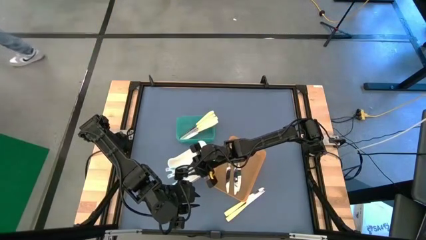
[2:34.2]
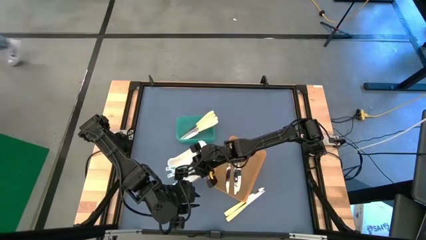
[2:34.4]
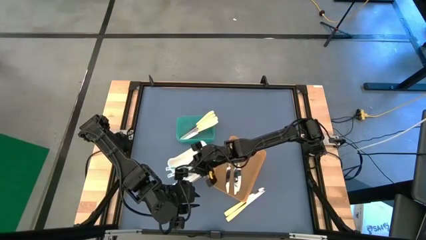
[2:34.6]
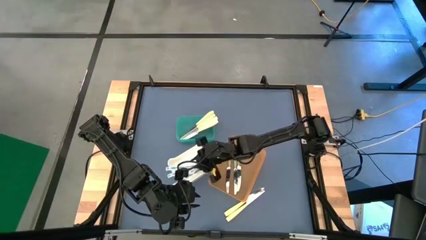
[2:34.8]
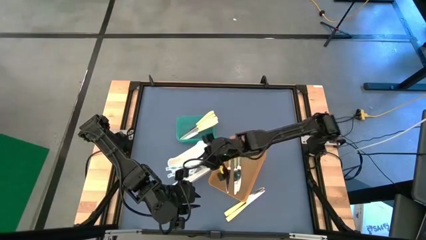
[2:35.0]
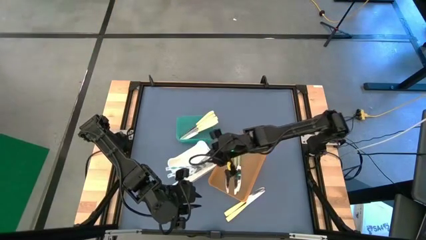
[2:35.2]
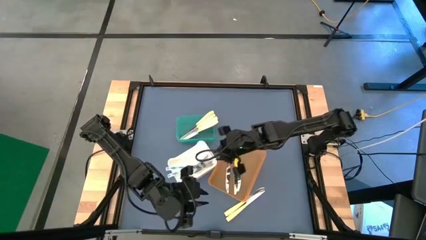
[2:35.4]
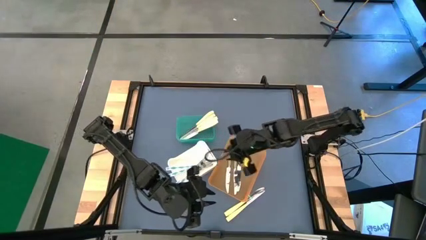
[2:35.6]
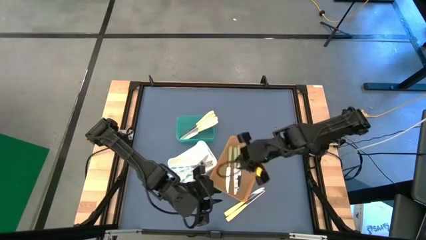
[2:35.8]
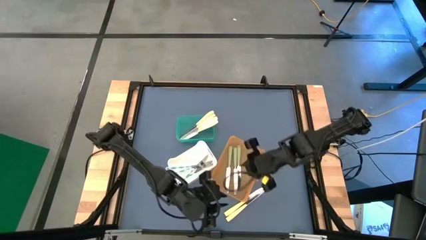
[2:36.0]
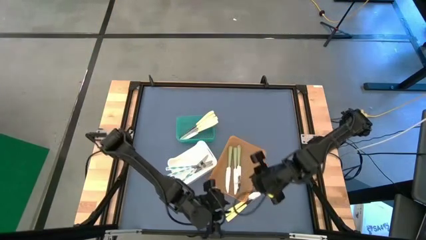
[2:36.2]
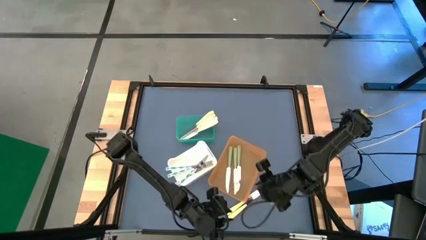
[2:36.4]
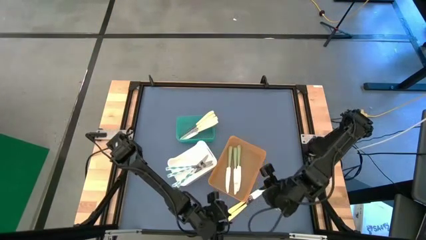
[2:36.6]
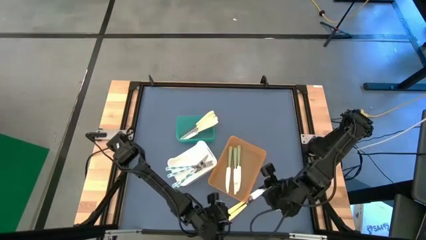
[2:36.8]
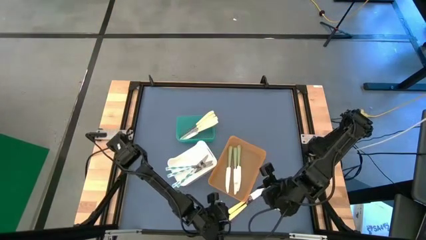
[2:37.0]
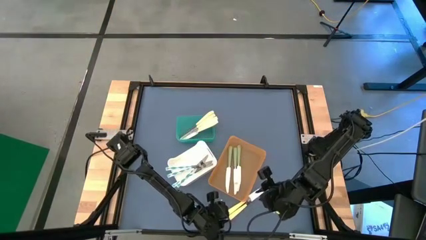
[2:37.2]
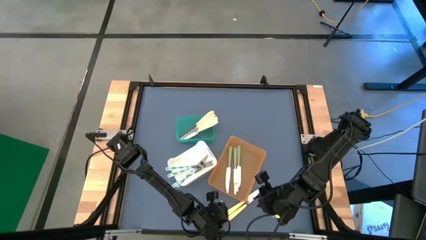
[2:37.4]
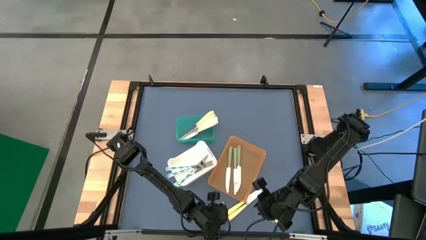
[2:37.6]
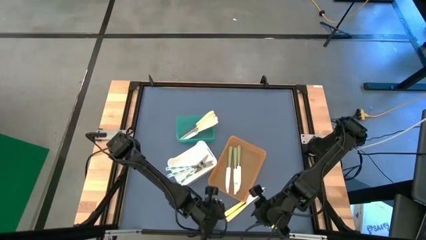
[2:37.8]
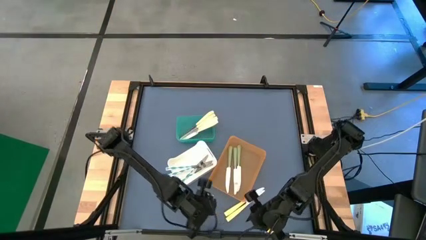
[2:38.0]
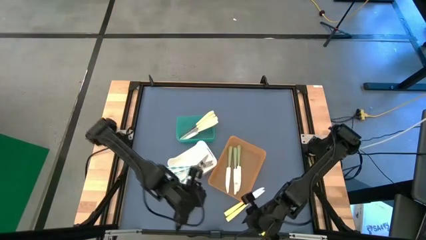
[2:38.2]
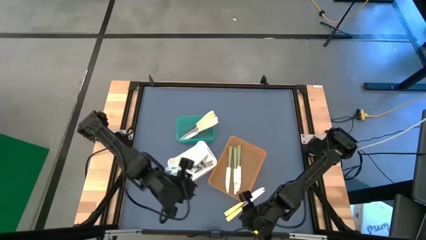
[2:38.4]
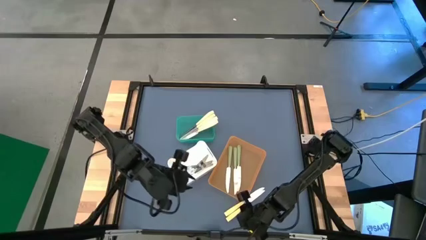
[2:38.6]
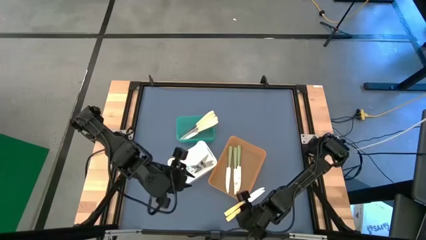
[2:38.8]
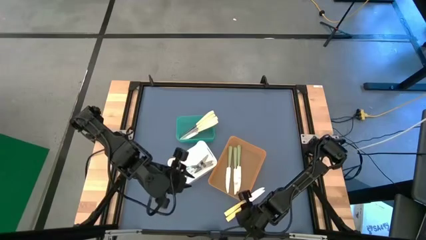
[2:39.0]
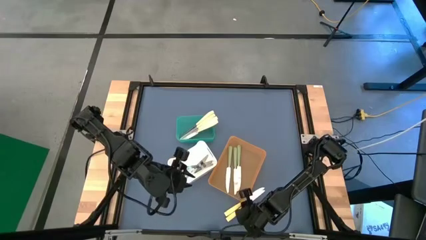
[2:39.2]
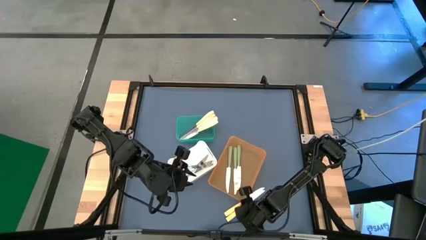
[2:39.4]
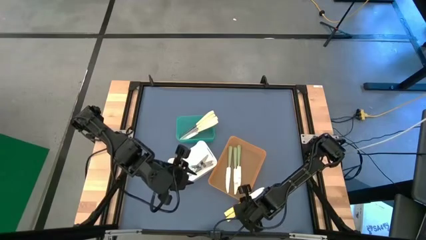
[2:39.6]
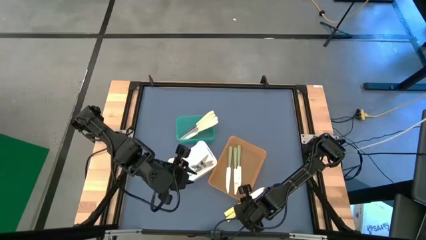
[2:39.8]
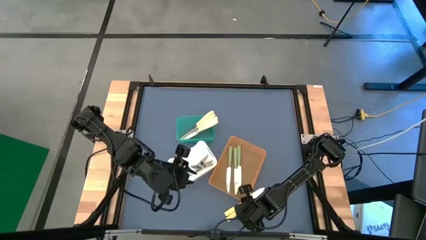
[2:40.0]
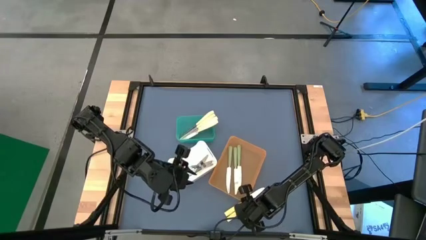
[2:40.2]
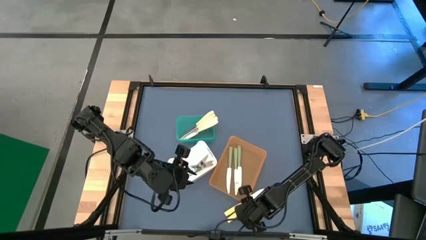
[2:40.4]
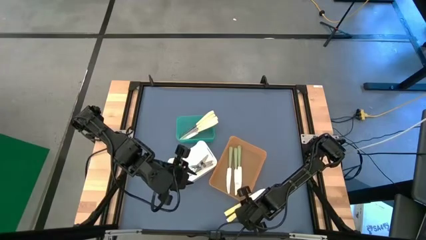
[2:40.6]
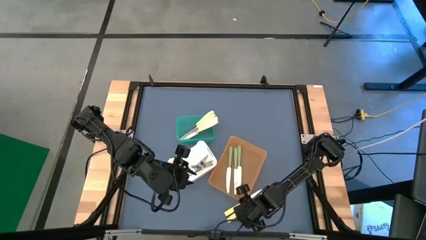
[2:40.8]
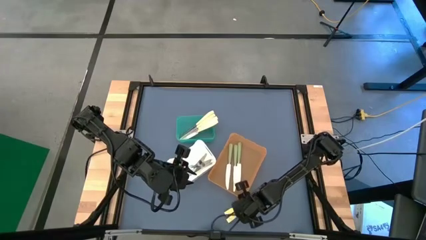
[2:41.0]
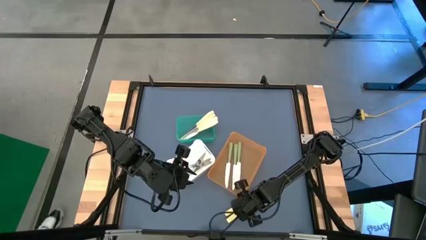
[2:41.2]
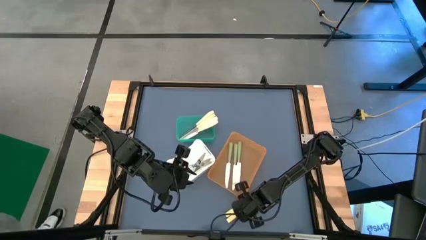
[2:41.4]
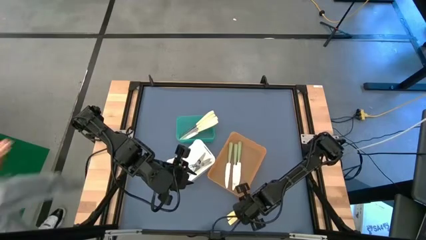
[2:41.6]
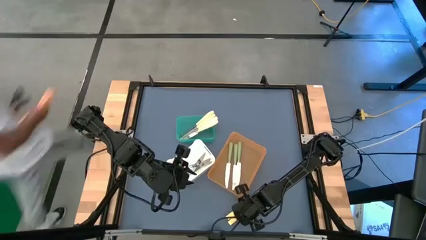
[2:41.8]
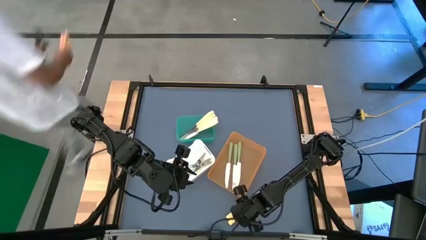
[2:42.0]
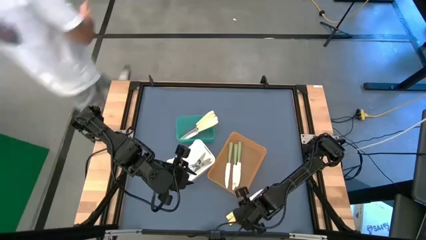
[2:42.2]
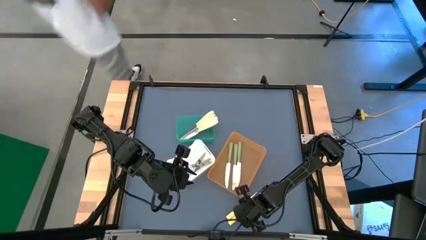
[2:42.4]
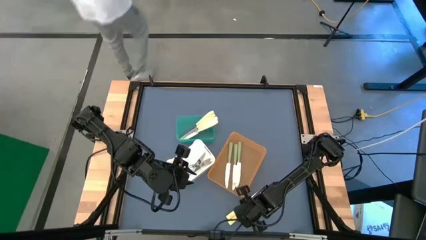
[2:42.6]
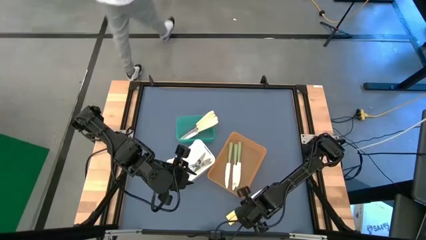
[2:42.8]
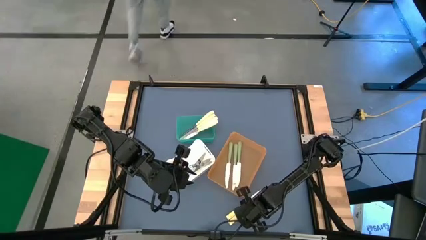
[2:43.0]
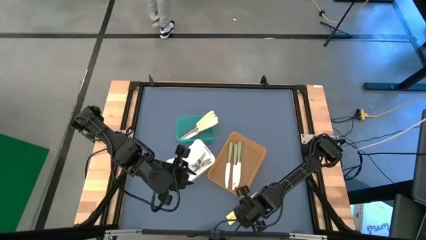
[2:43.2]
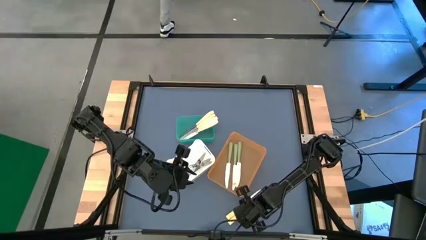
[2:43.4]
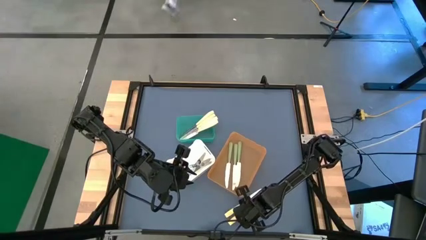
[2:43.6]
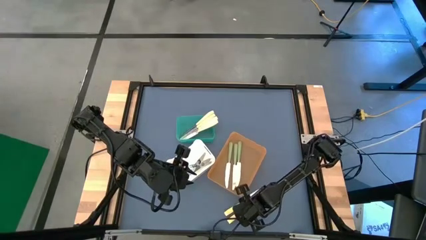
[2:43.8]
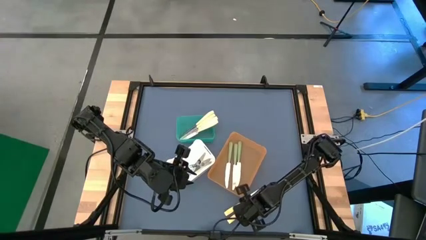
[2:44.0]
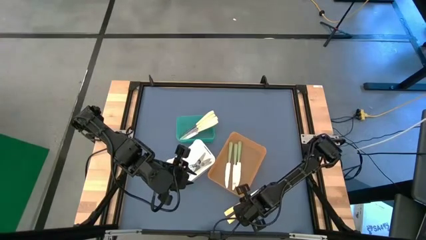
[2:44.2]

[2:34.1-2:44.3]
Task: Sort silverware by color (type)
Put the yellow knife into the blue bin
